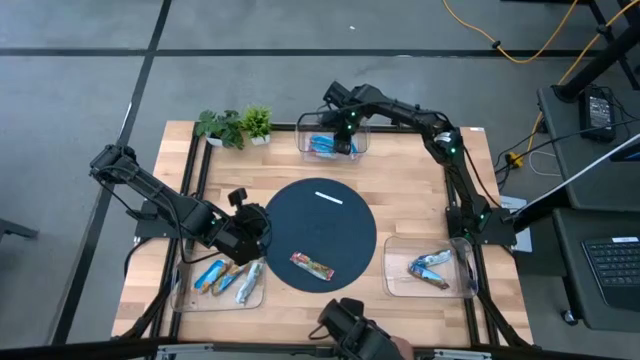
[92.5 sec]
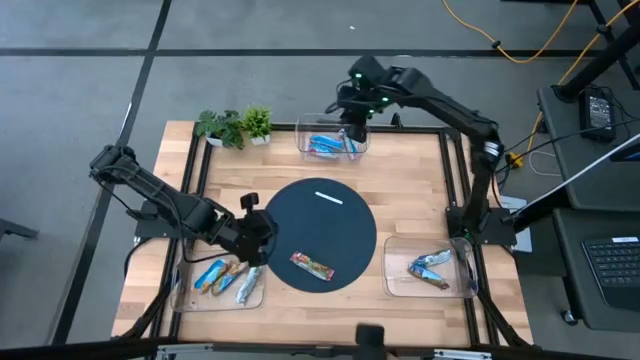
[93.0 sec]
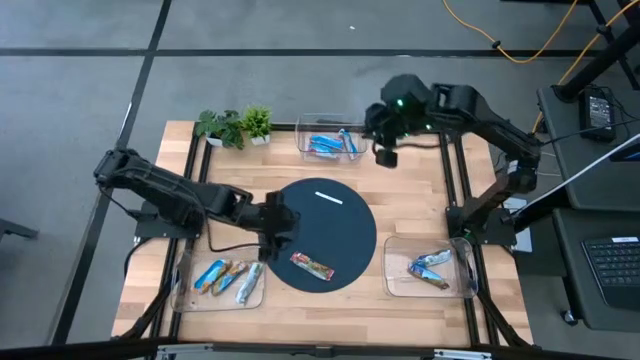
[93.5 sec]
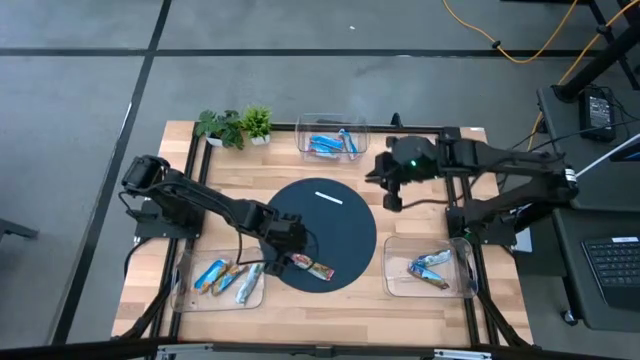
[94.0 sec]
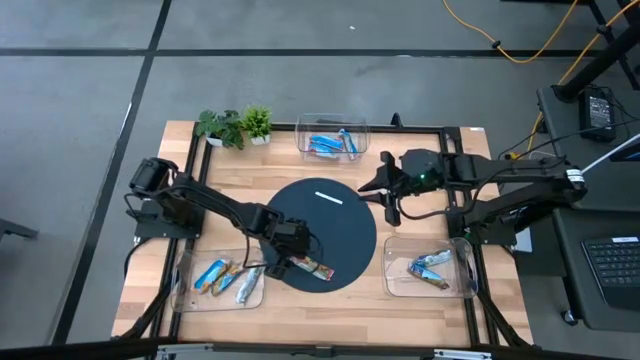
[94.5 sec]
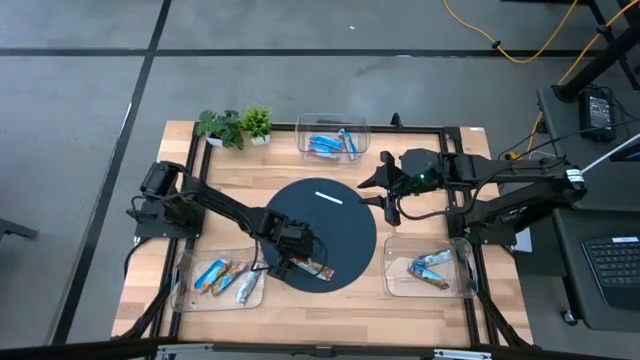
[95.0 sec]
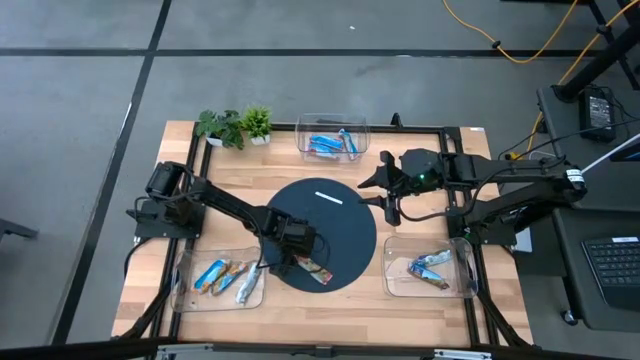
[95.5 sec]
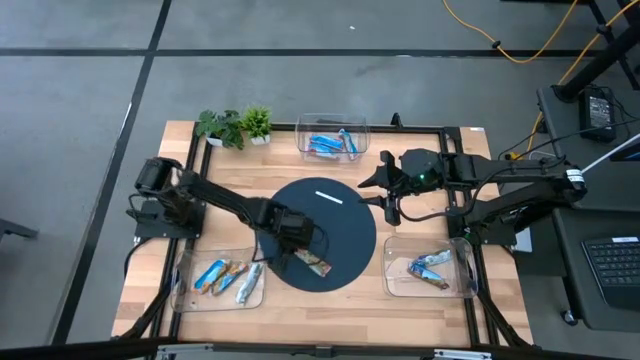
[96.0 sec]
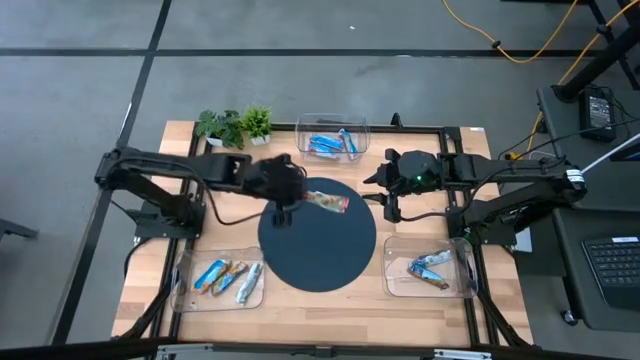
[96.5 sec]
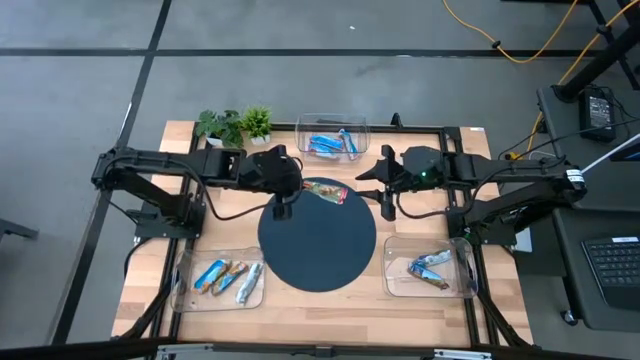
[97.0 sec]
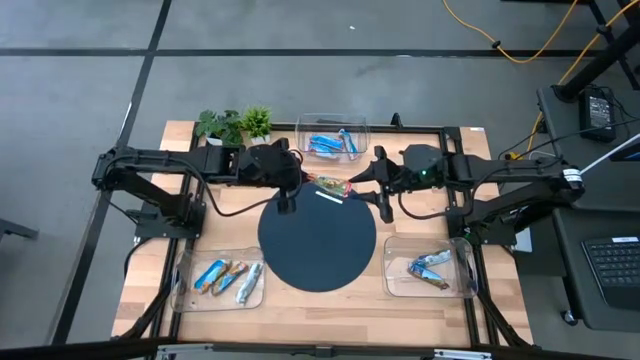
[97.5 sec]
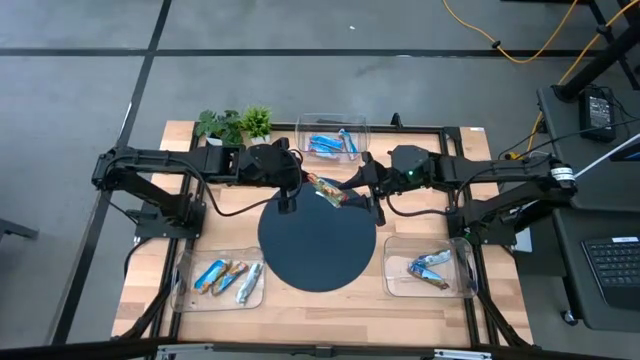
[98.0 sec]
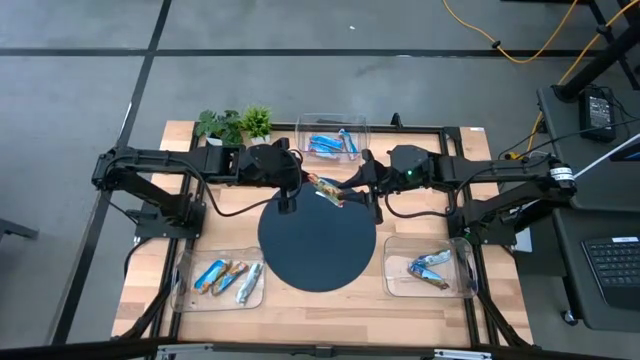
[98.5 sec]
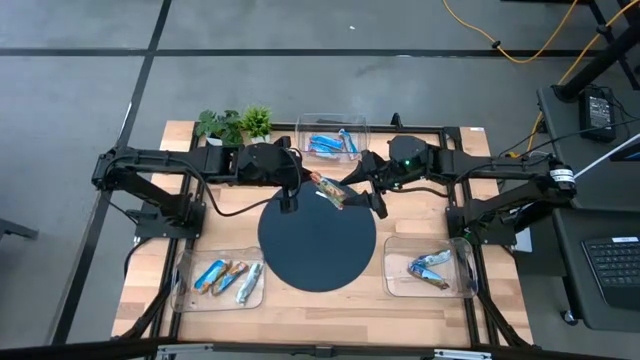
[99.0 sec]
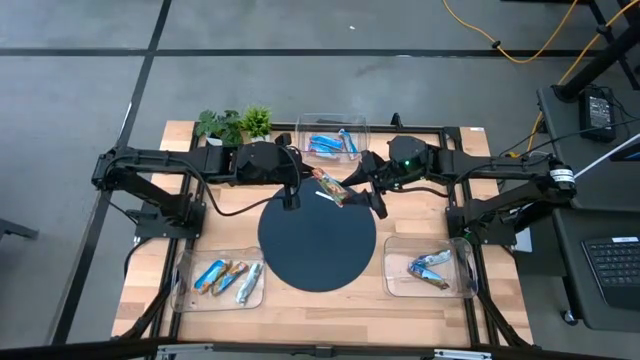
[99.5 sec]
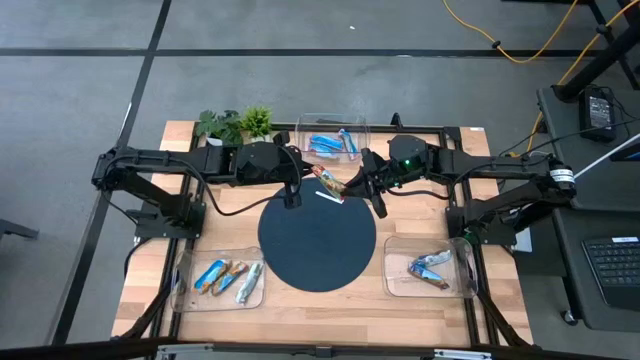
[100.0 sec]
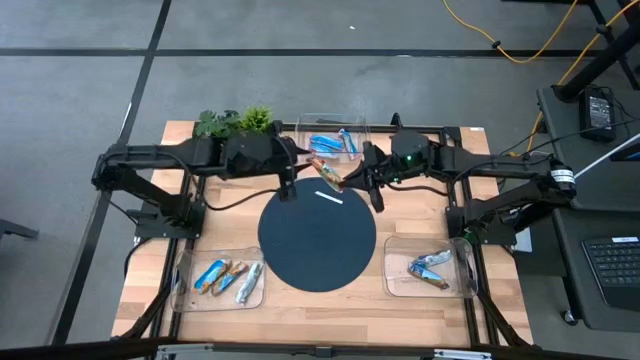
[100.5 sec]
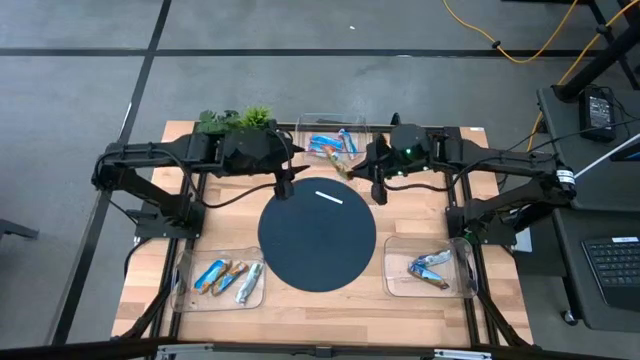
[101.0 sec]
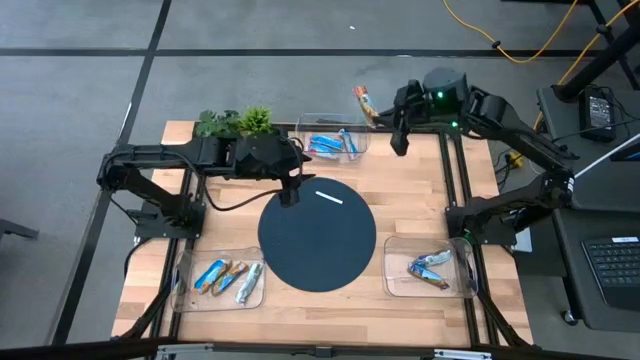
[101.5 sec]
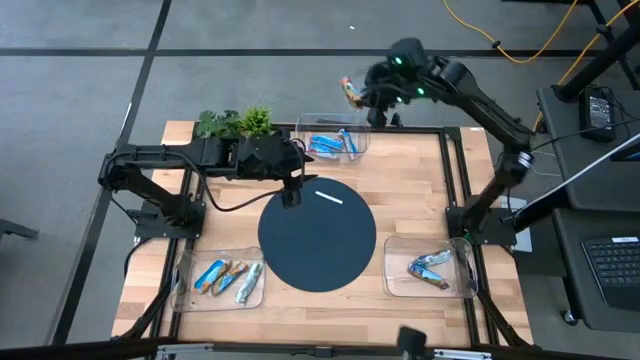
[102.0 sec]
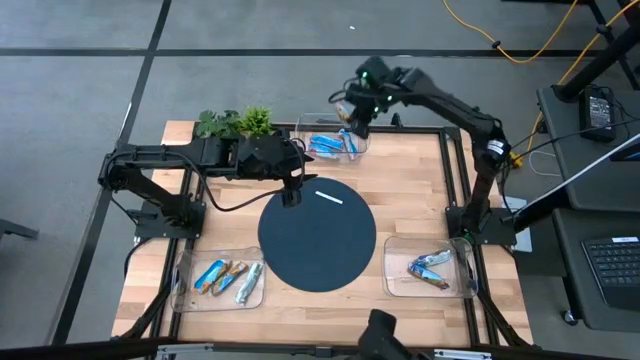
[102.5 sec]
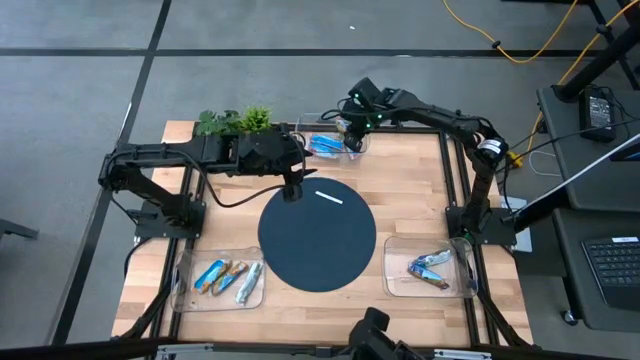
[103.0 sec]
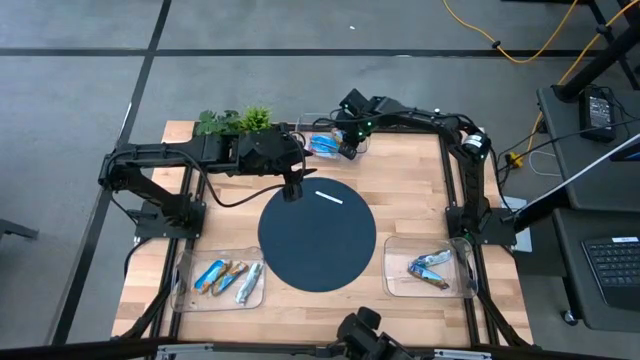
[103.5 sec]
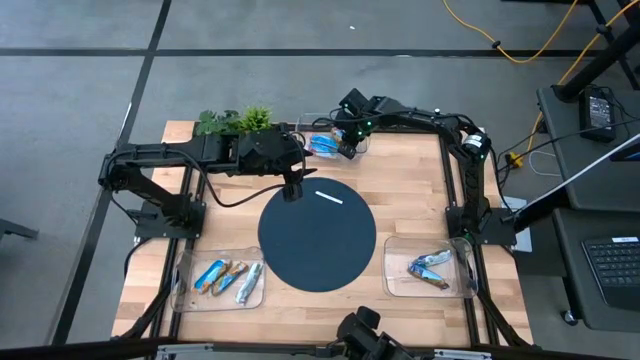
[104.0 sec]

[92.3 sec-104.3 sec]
Task: Pick and place Granola Bars by type
Put the red granola bar into the top transparent bin

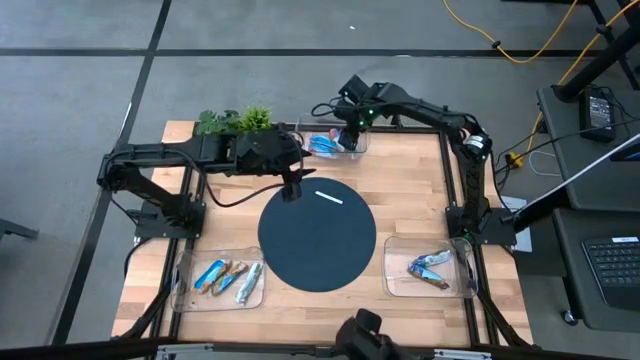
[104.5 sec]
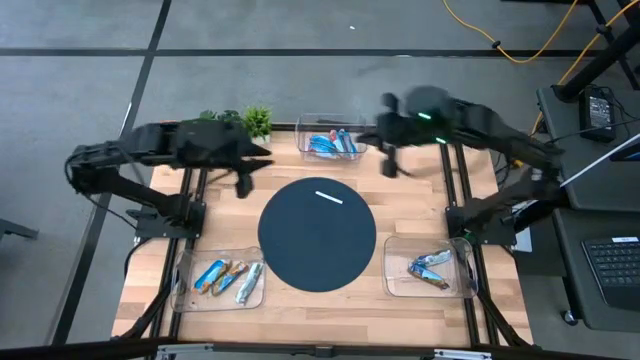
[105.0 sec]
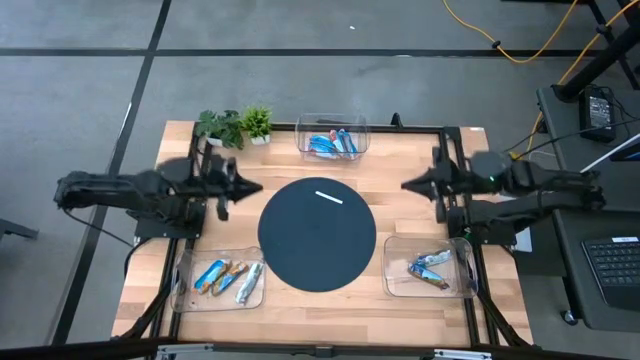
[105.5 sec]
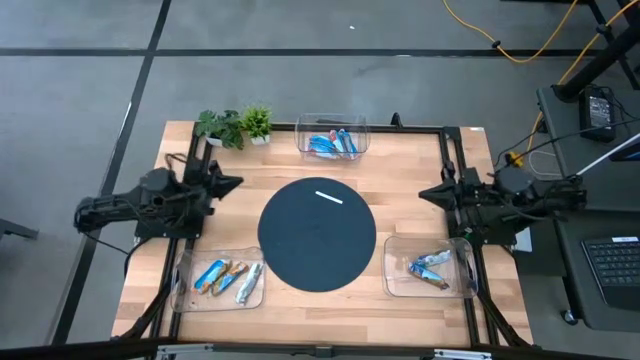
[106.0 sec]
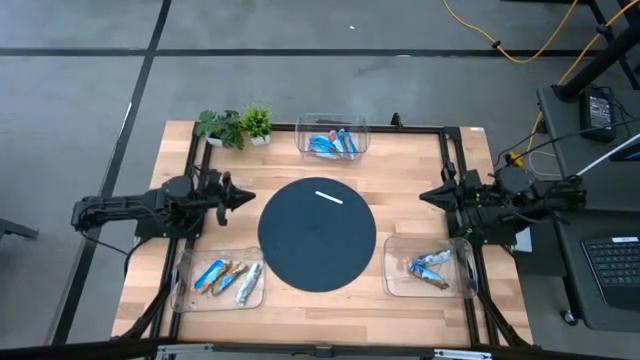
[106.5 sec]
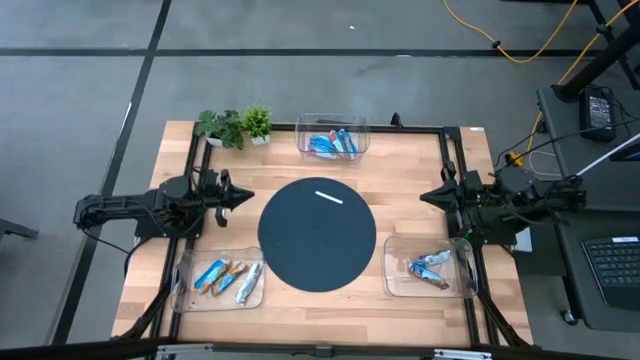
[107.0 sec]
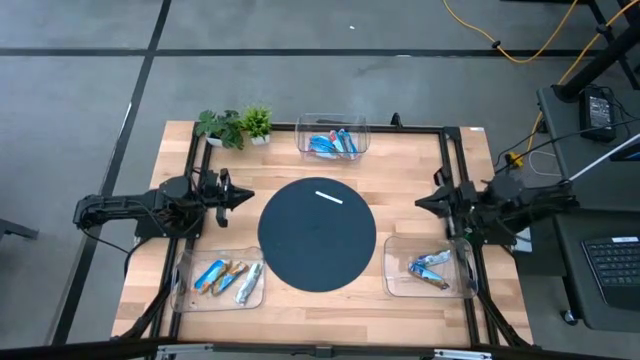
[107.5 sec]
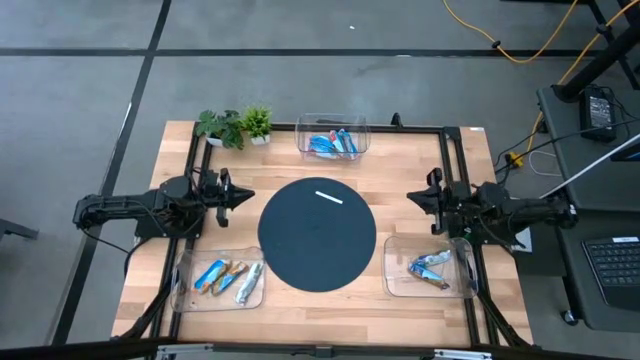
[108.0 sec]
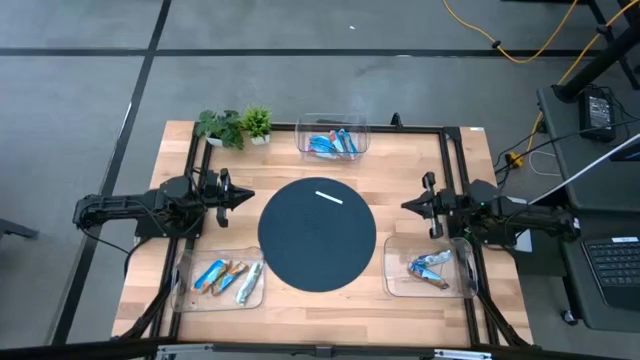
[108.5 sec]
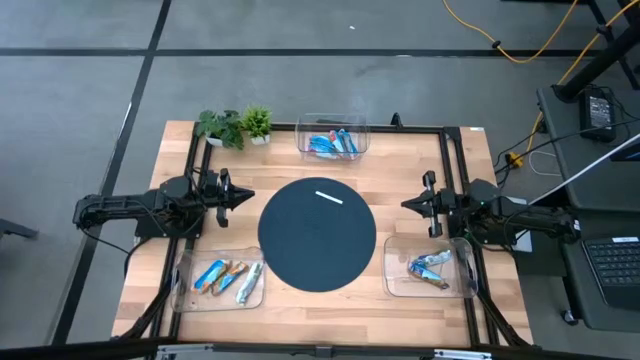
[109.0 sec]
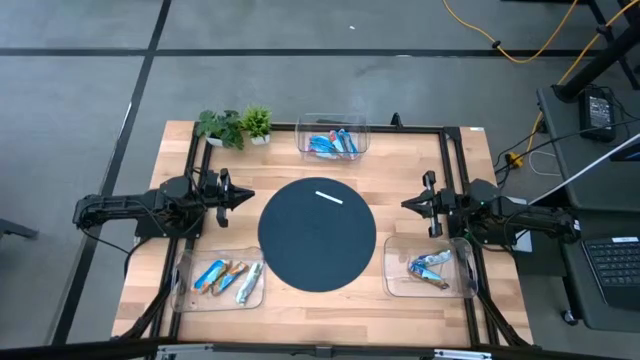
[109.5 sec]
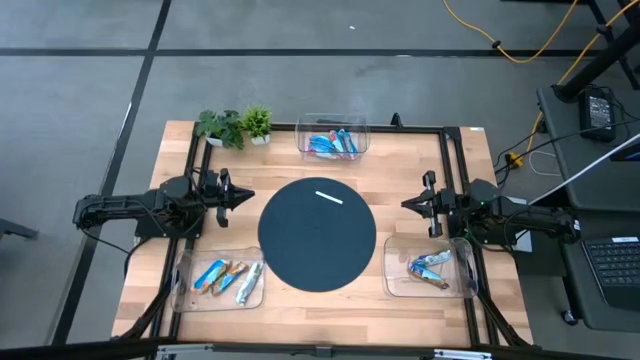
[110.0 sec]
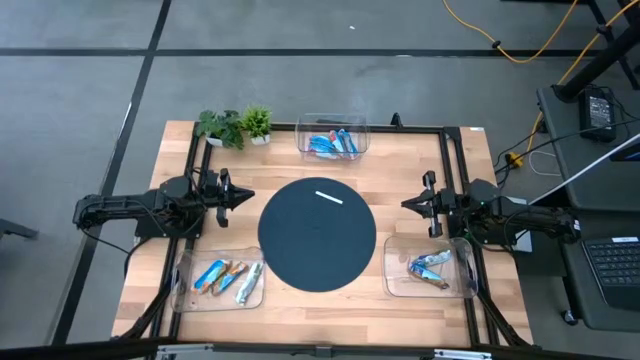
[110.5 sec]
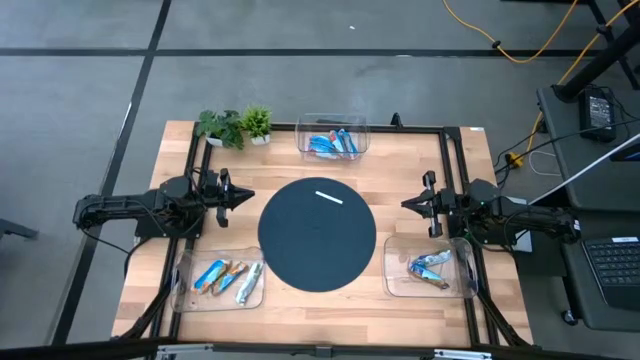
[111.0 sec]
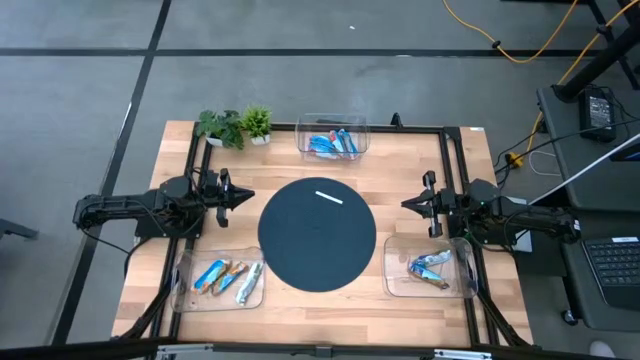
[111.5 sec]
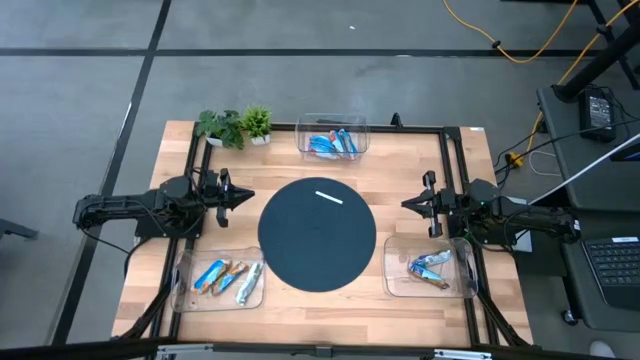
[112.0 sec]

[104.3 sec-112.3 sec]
Return to Home Position

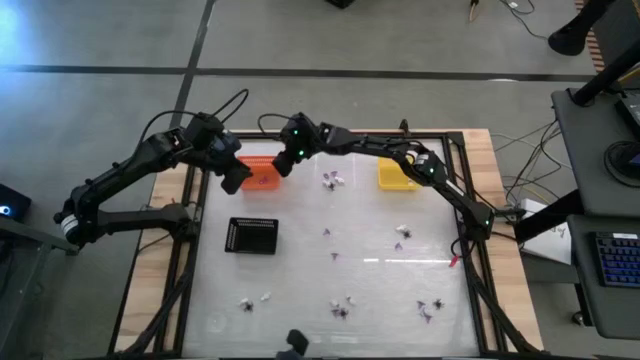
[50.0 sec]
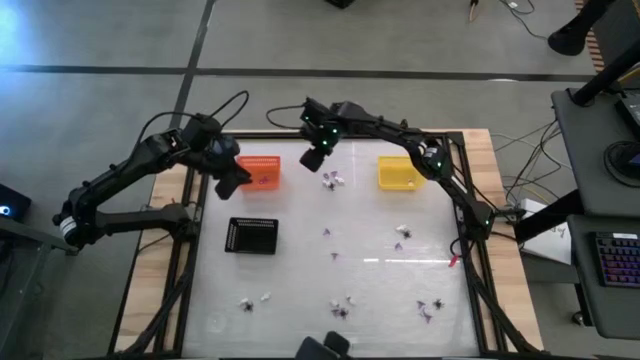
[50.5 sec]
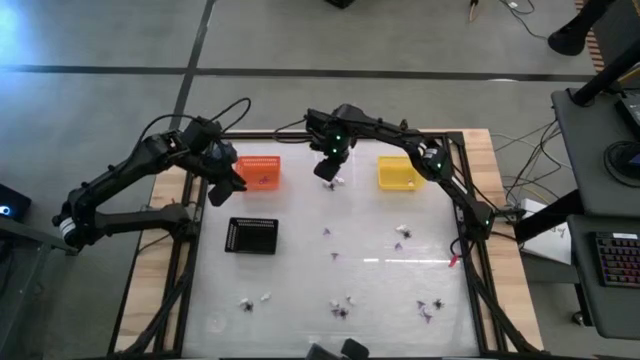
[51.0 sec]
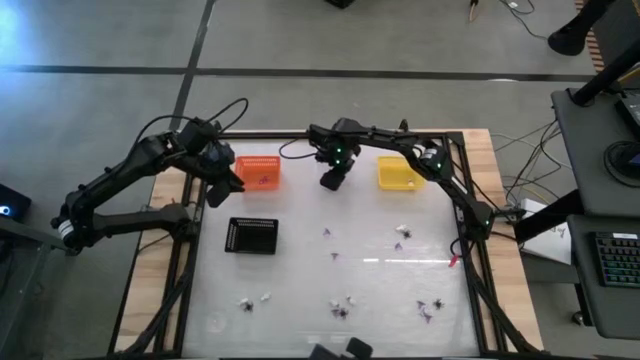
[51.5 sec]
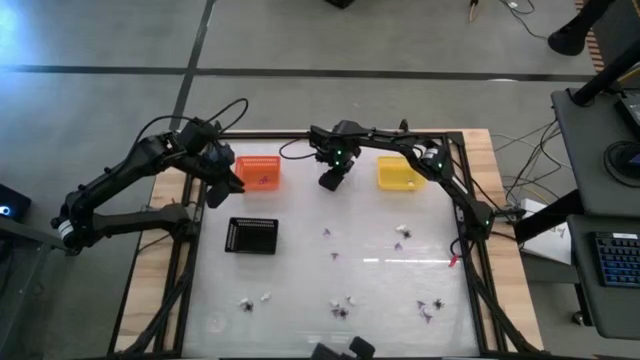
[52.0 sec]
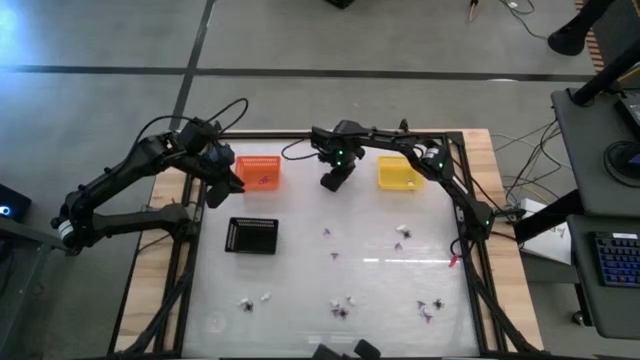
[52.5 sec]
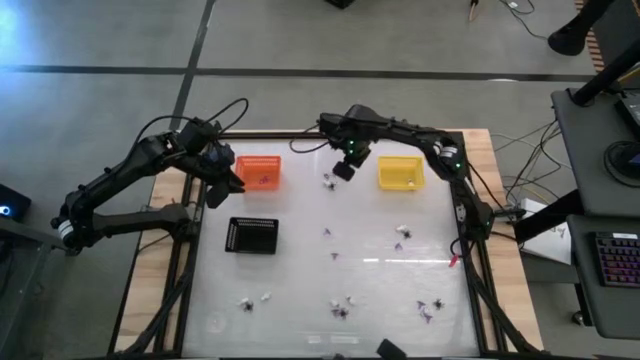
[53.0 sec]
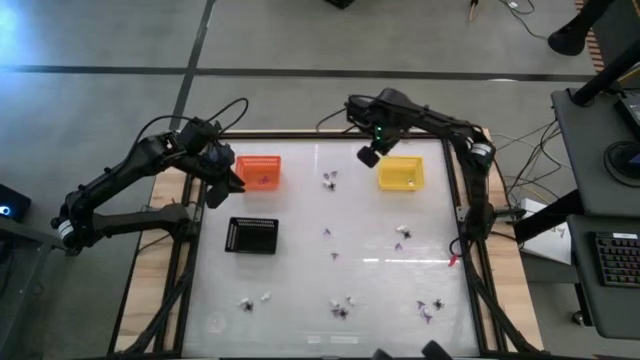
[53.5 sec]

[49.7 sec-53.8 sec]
Task: Sort Halloween decoration
Put the white skeleton toy into the yellow bin
